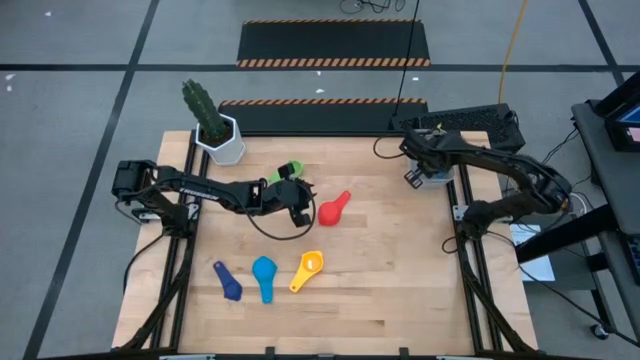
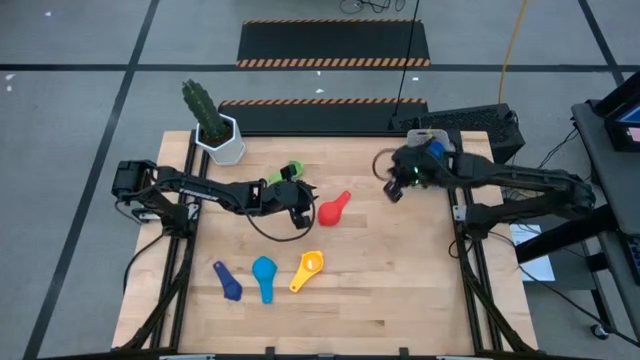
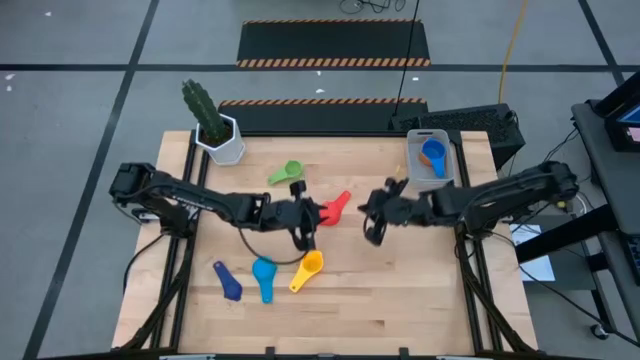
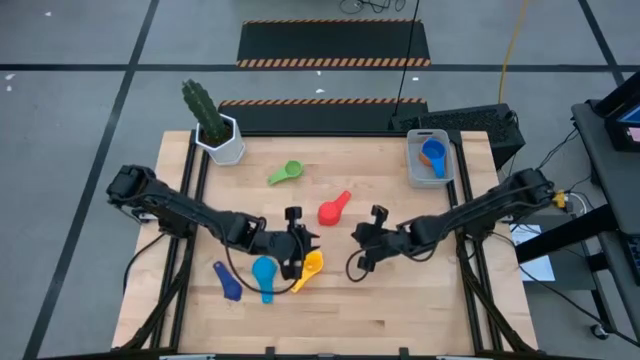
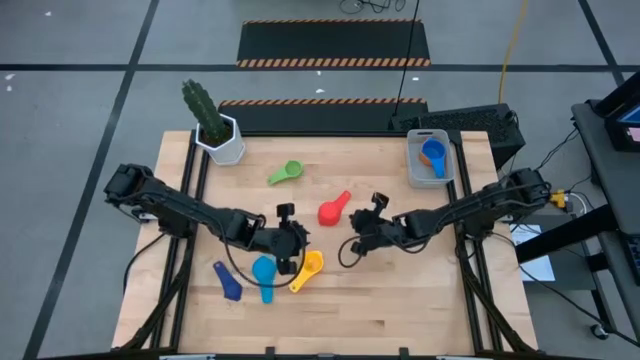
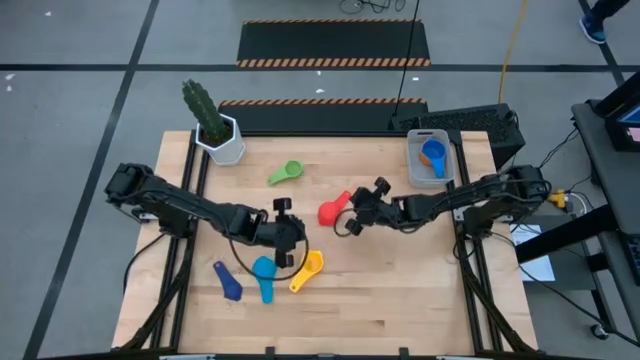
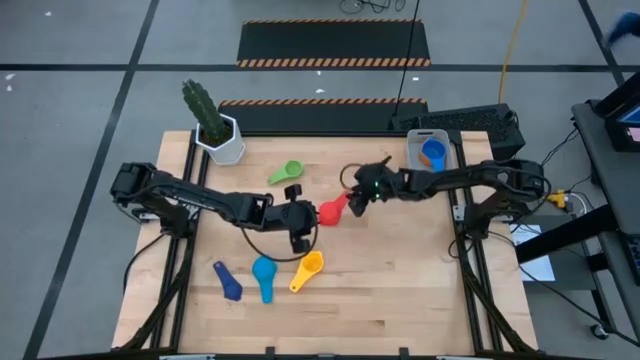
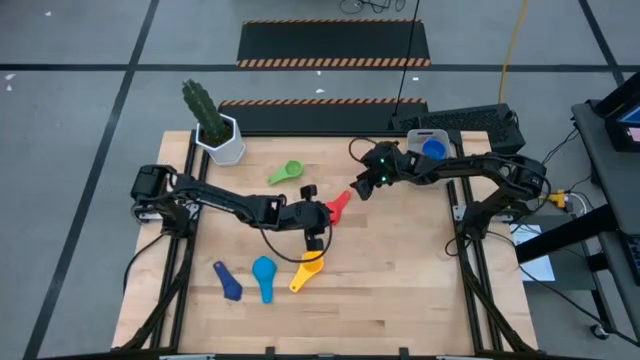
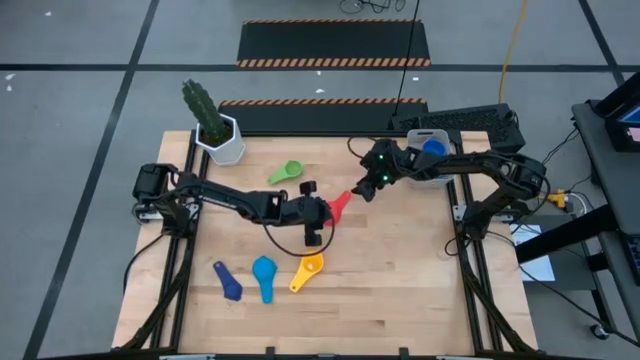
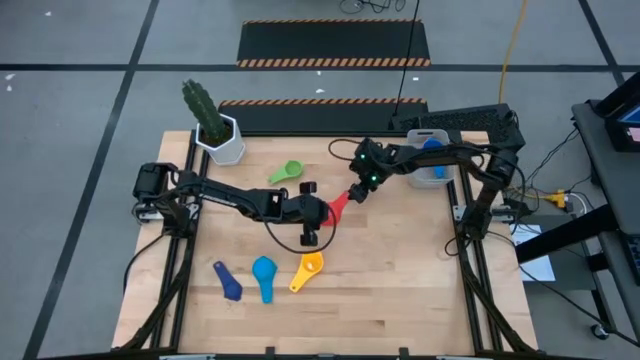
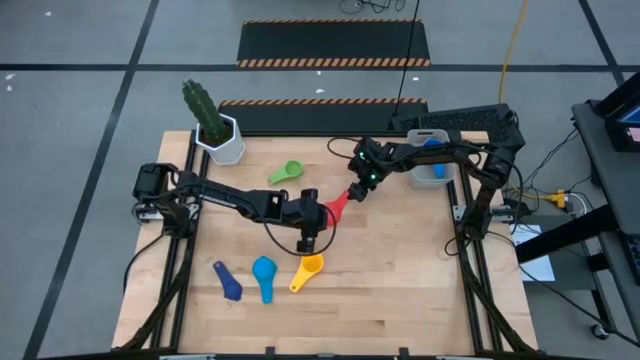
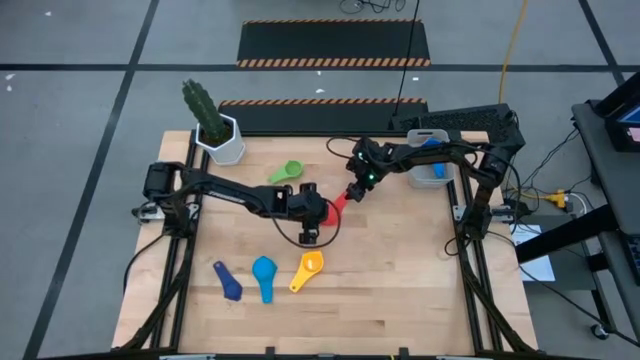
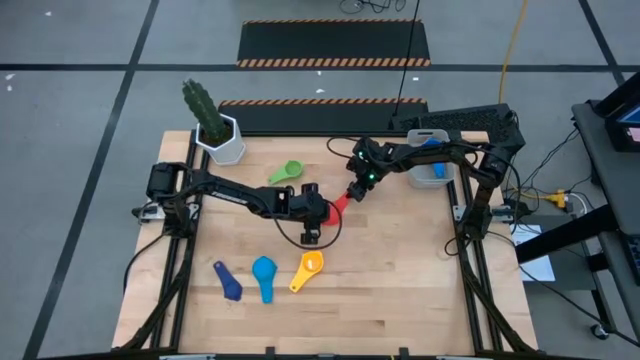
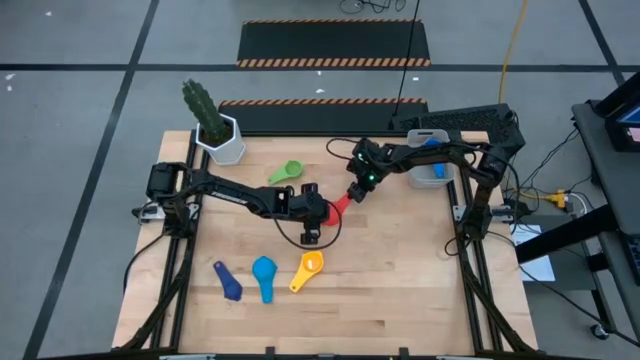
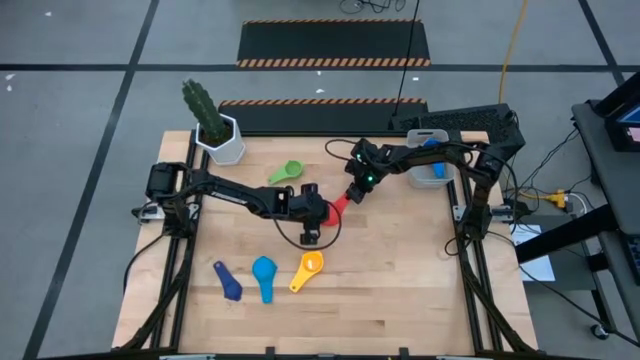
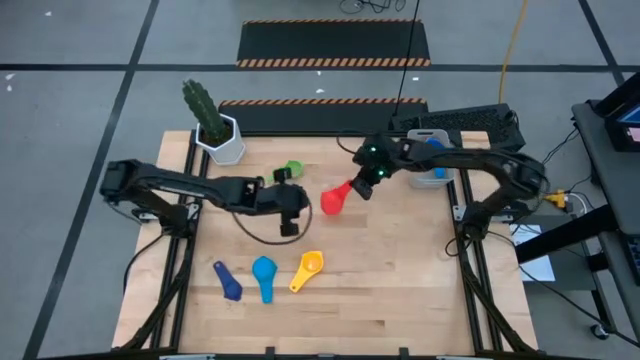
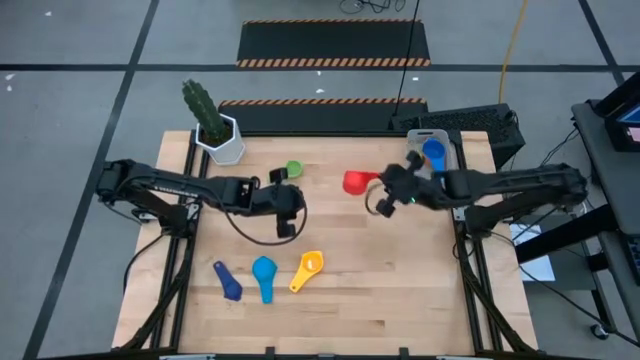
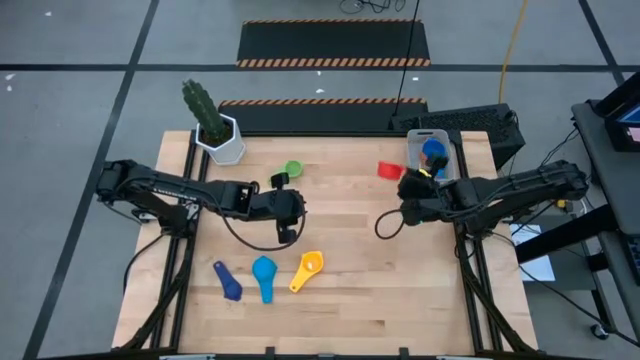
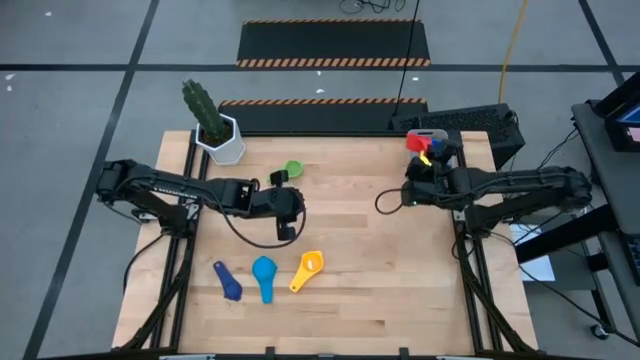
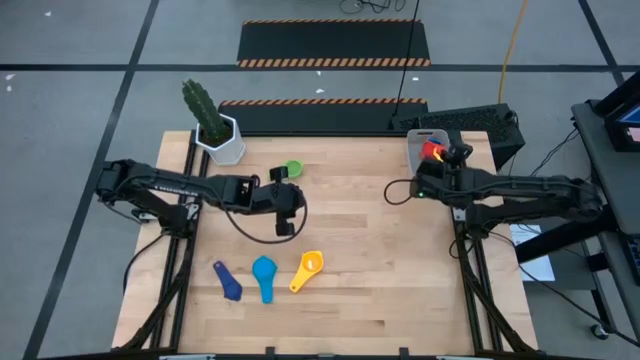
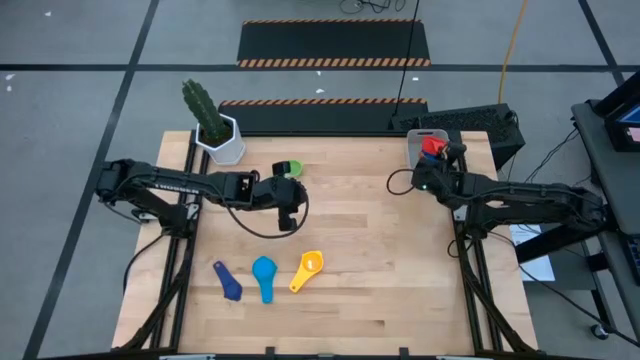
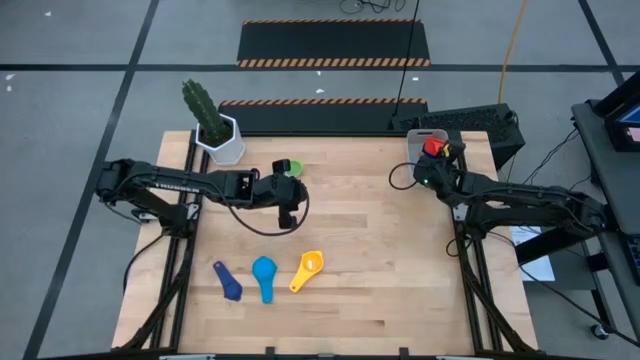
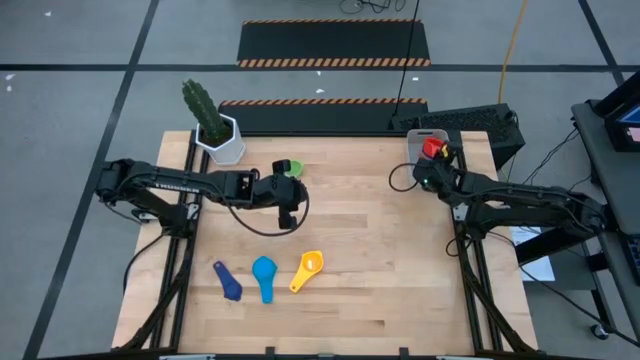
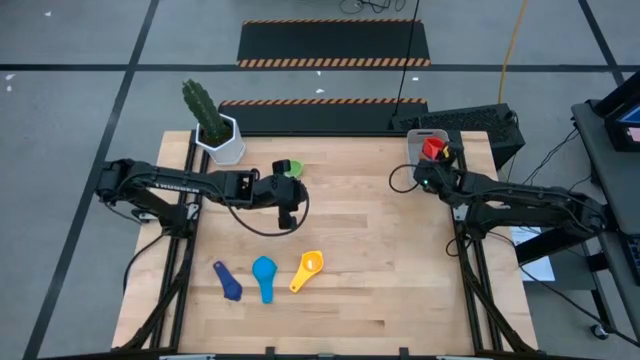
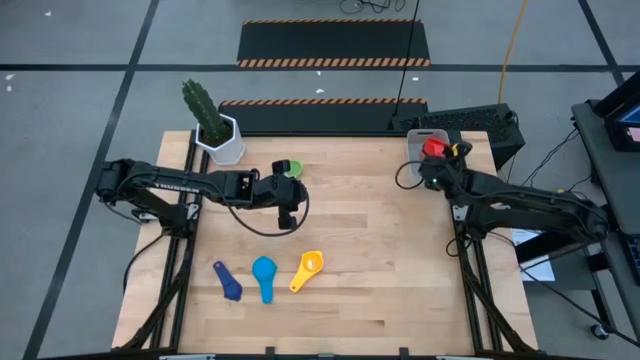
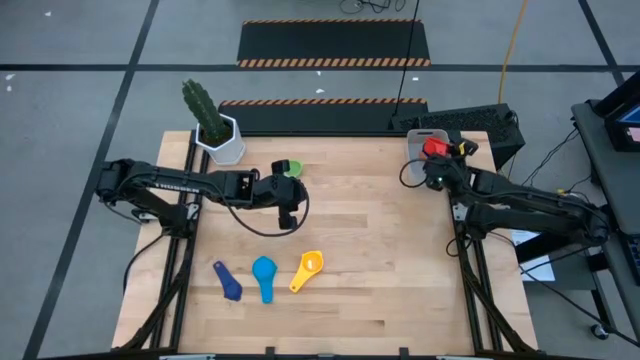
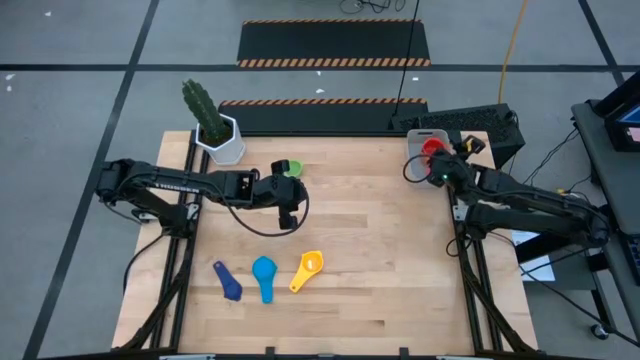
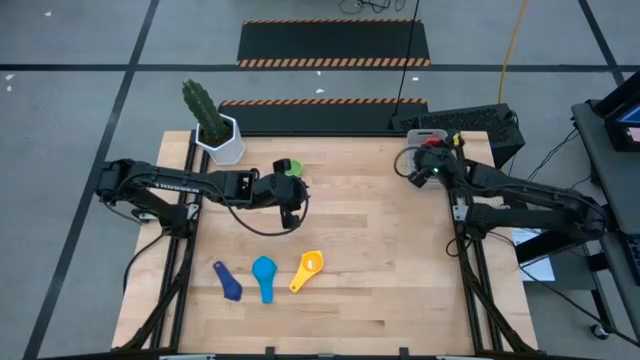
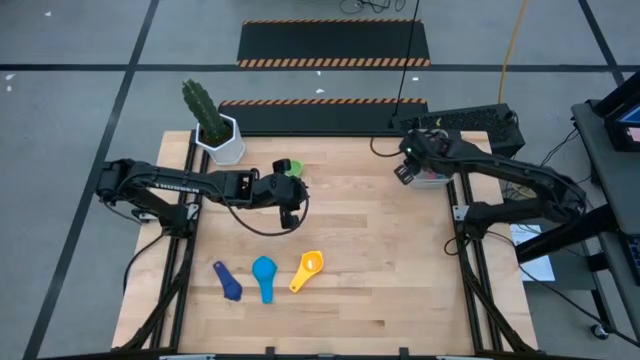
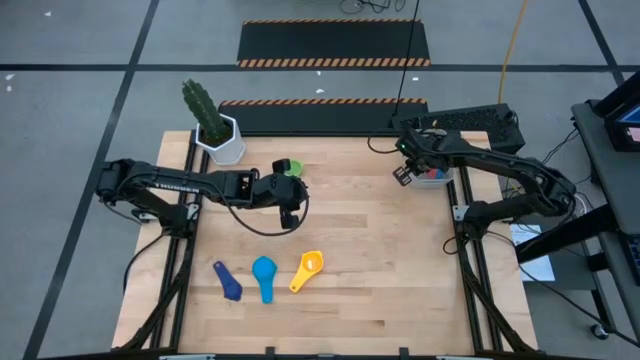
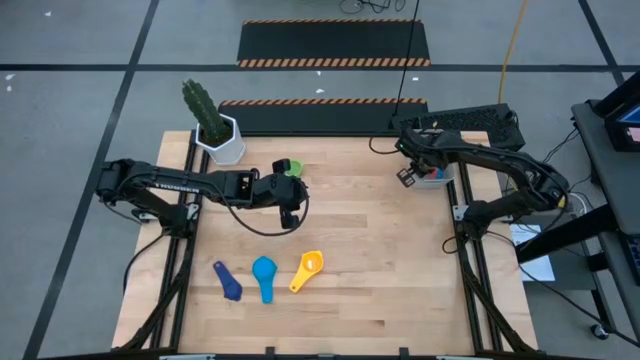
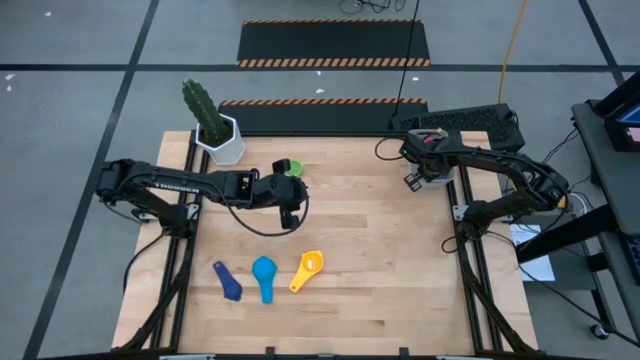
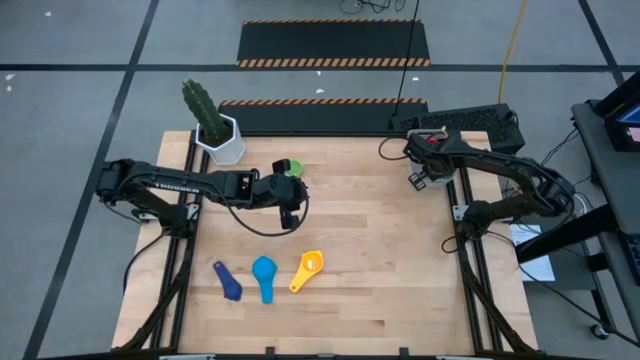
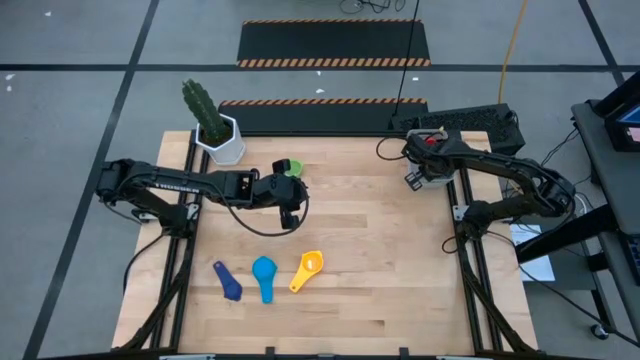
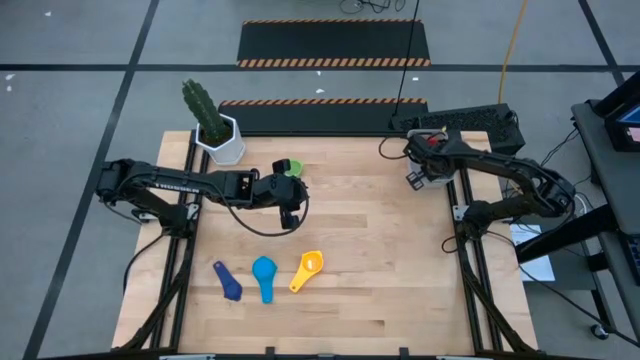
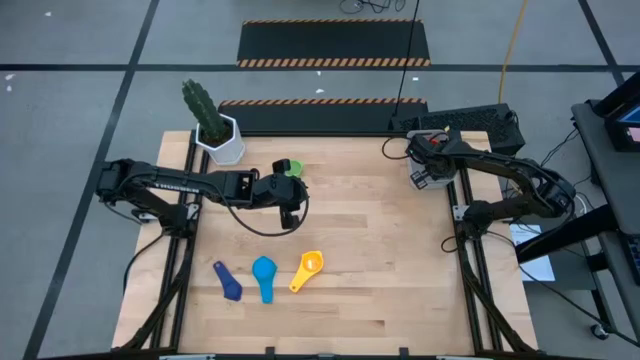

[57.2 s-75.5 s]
Task: Nest measuring cups in basket
Stack the red measuring cup on top of the dark blue measuring cup in the gray bin

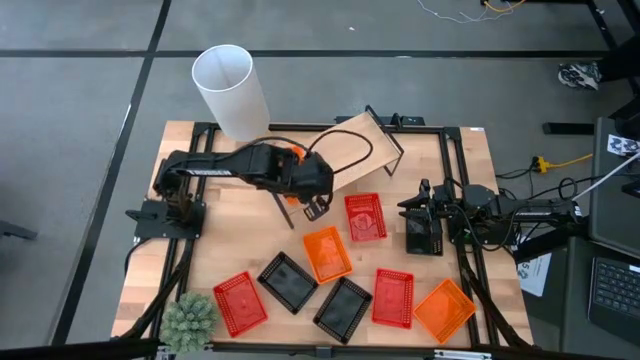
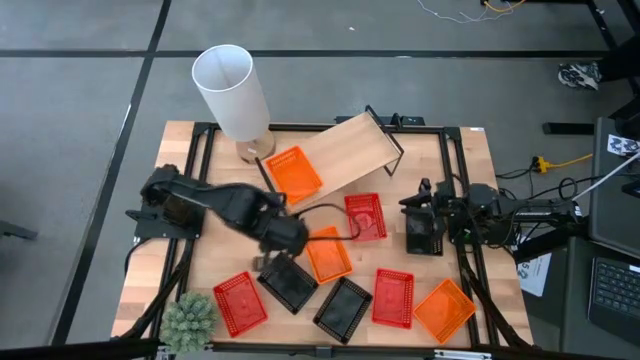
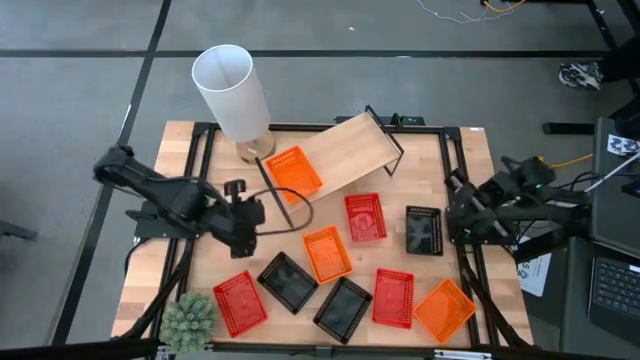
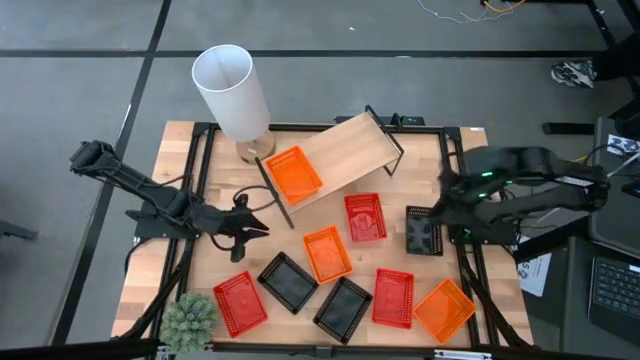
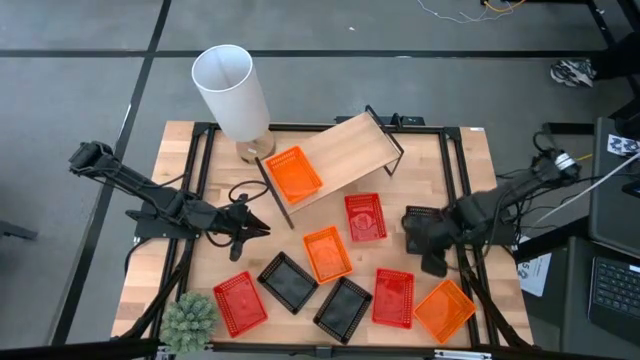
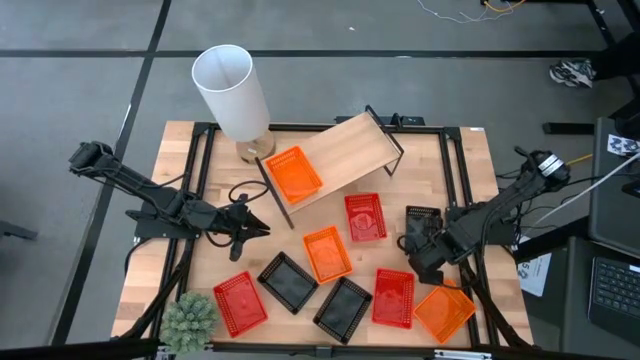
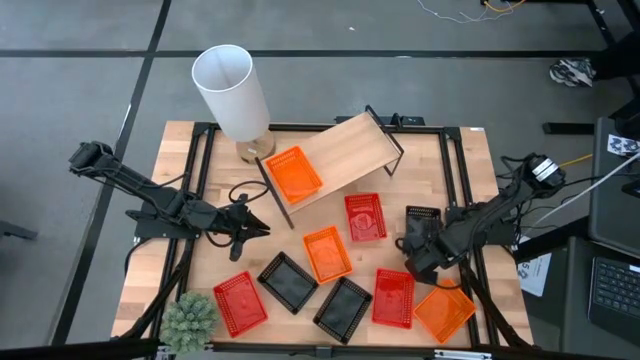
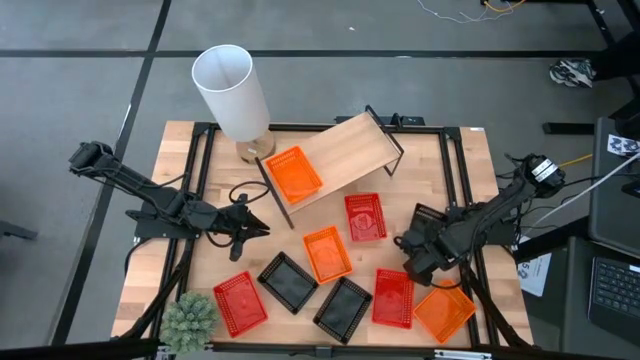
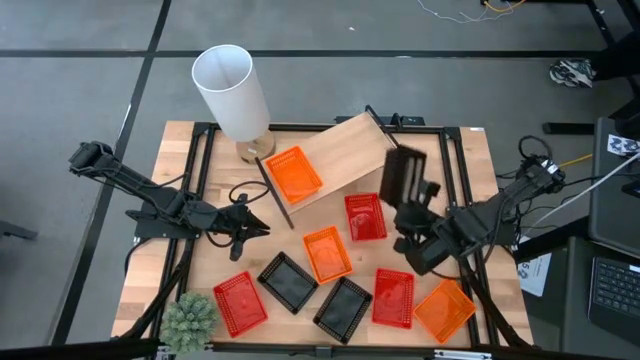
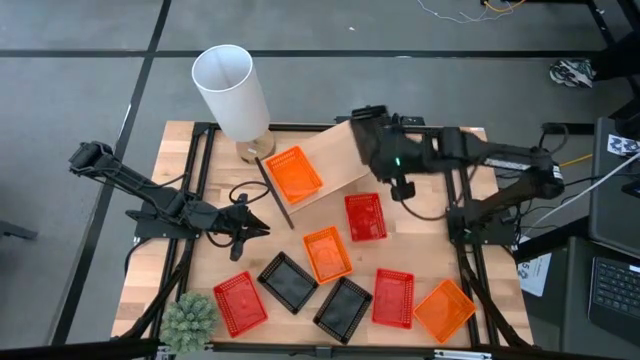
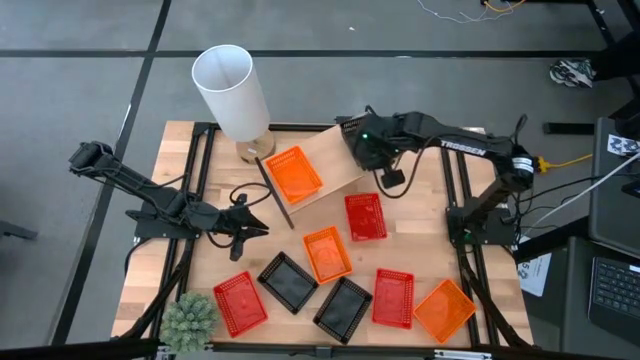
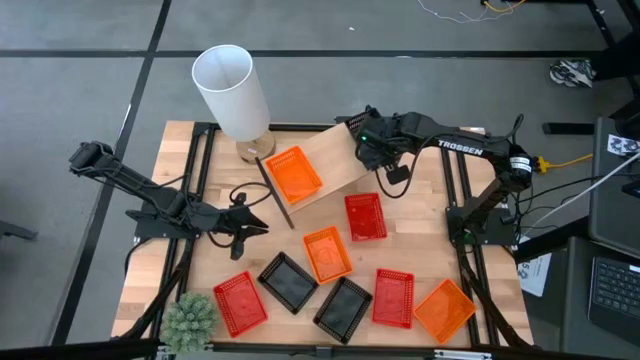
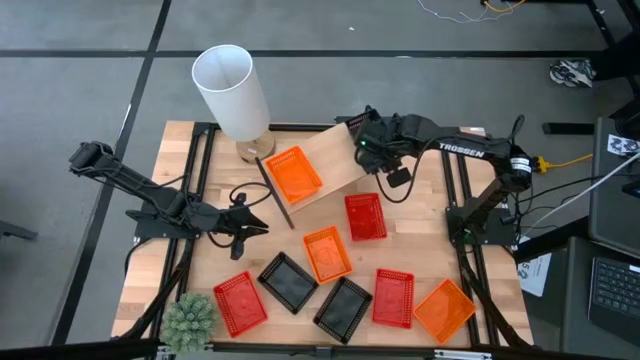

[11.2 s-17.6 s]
Task: Stack baskets on shelf by color
Put the top black basket on the shelf
